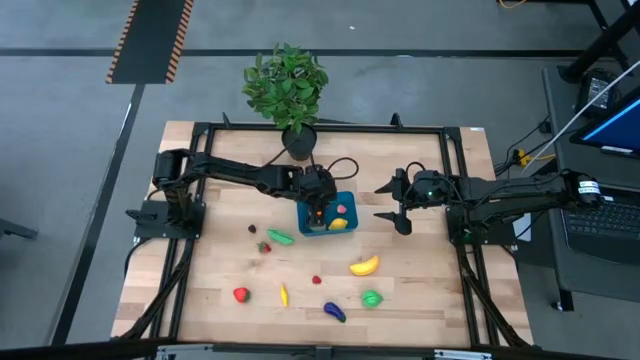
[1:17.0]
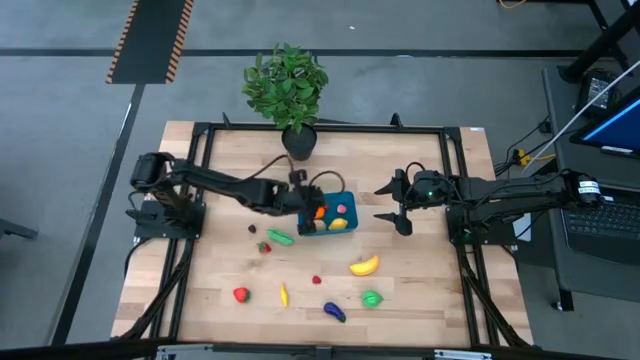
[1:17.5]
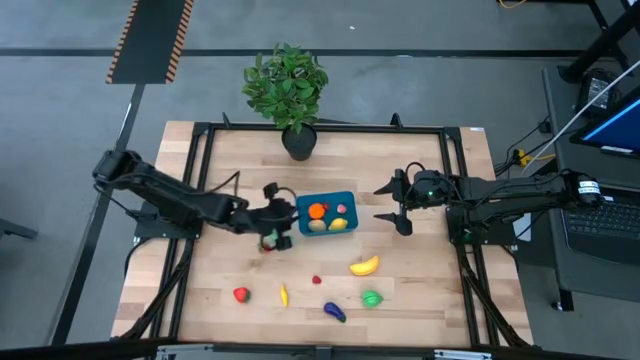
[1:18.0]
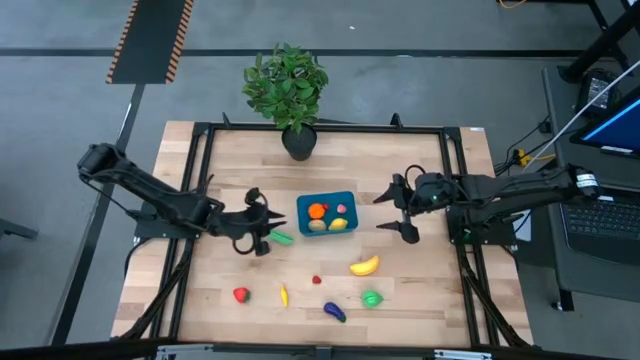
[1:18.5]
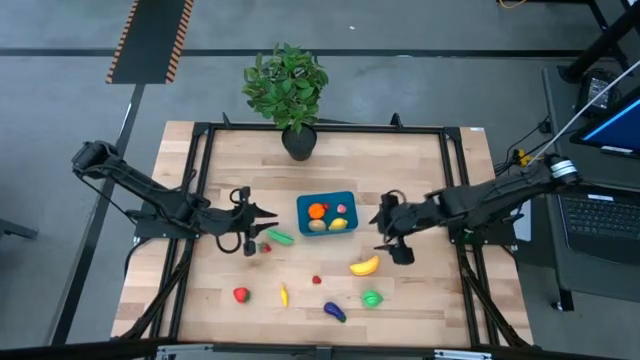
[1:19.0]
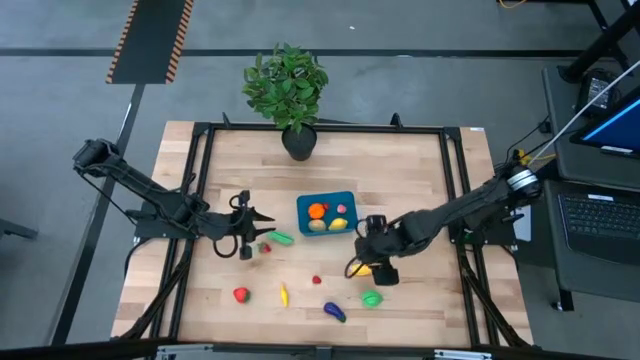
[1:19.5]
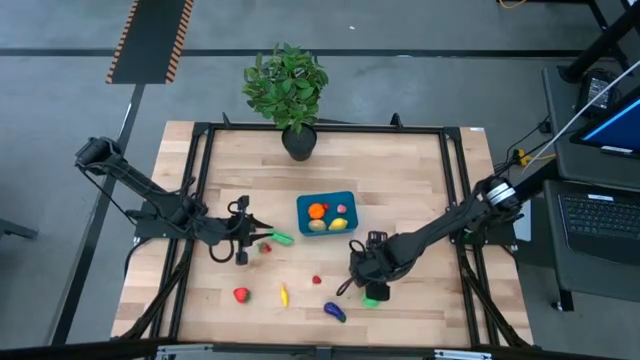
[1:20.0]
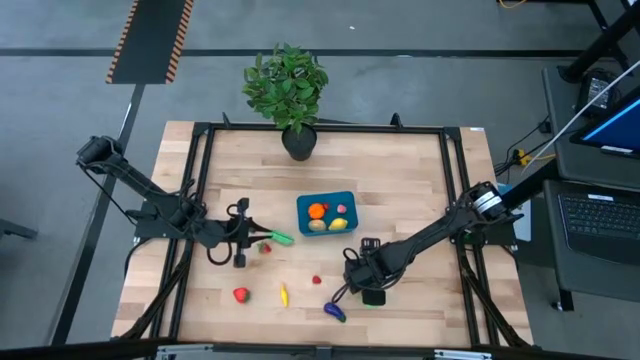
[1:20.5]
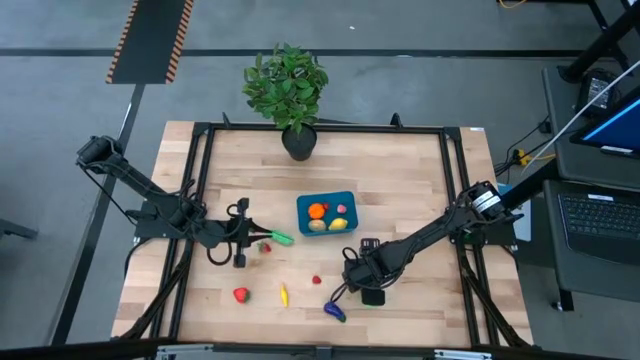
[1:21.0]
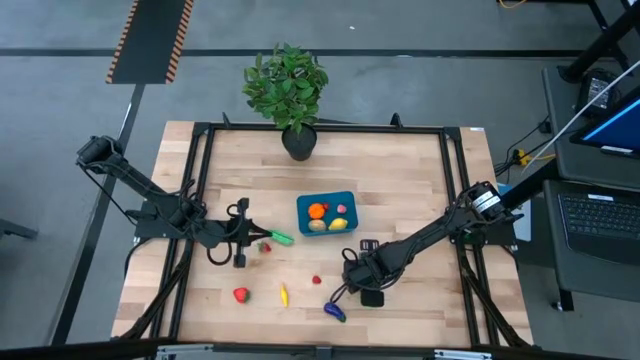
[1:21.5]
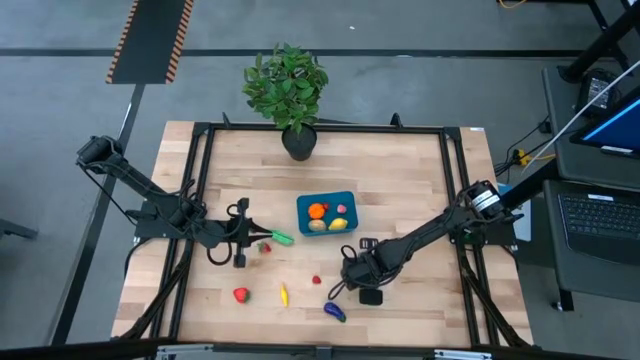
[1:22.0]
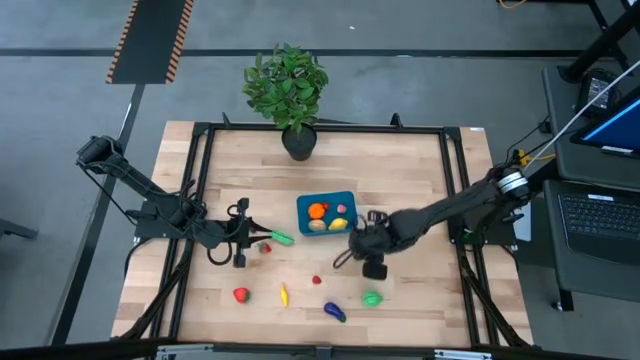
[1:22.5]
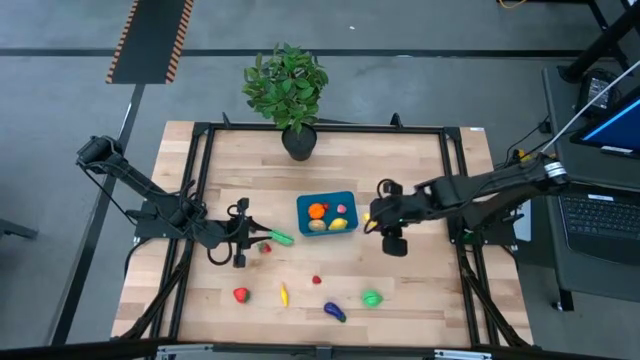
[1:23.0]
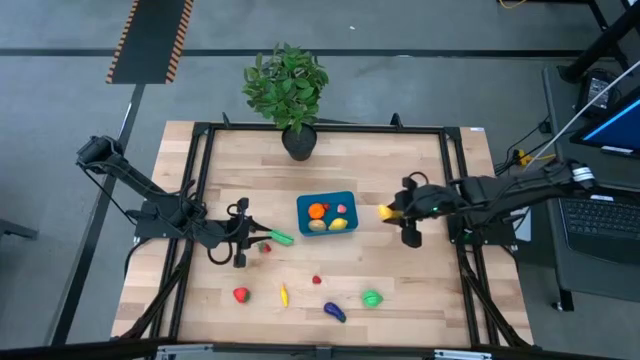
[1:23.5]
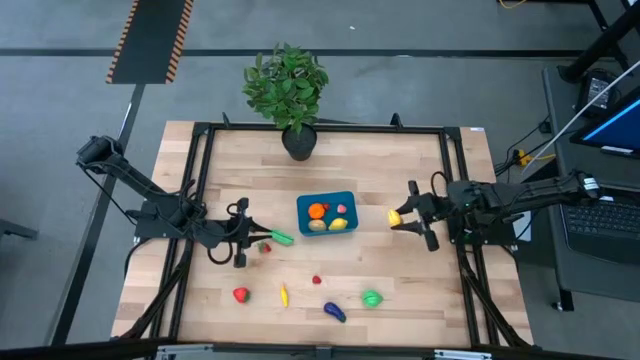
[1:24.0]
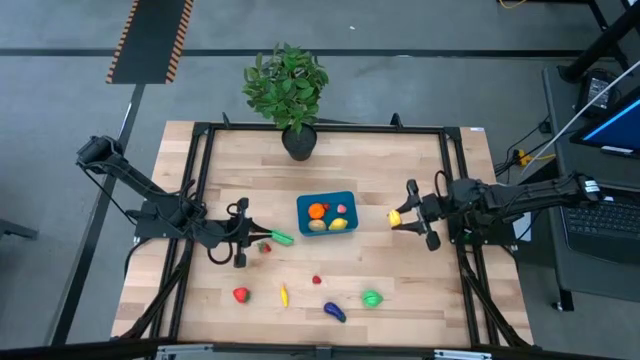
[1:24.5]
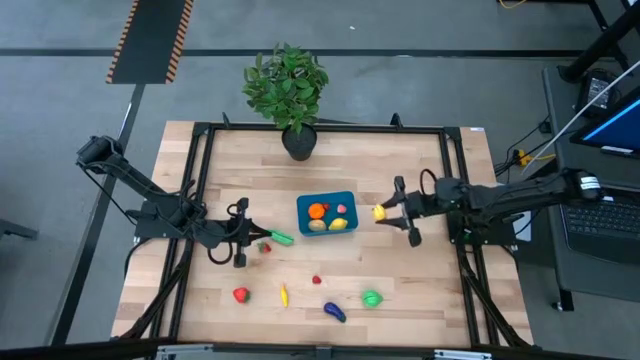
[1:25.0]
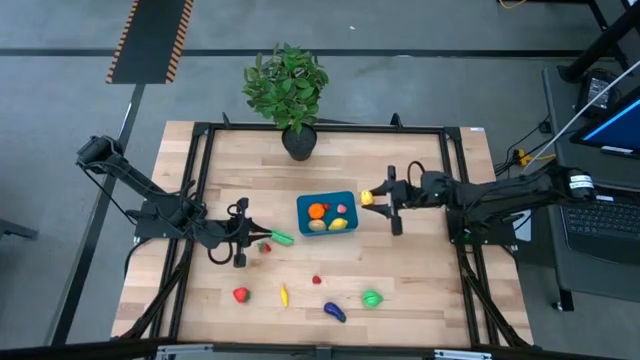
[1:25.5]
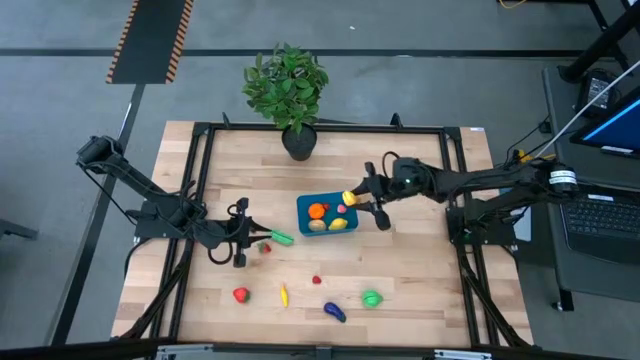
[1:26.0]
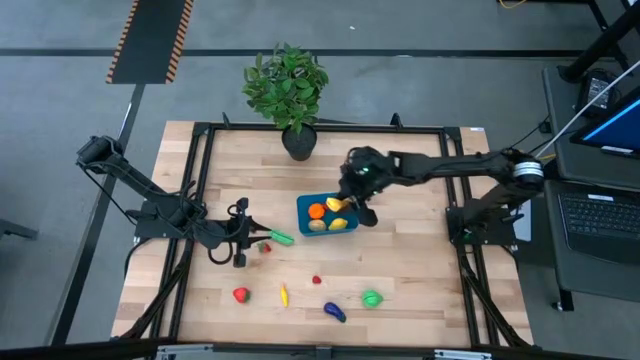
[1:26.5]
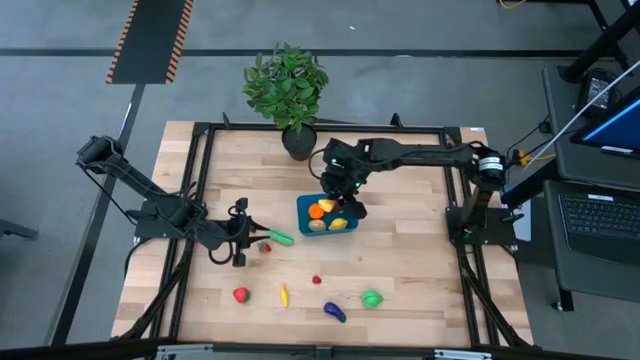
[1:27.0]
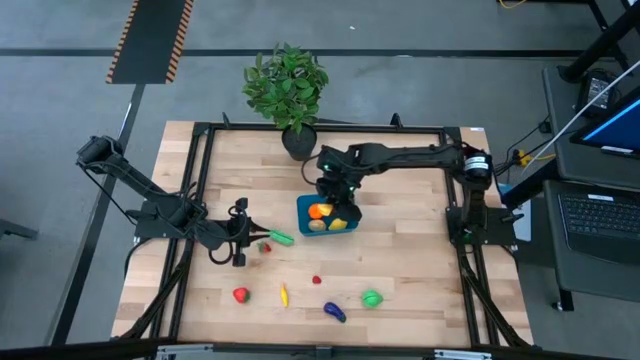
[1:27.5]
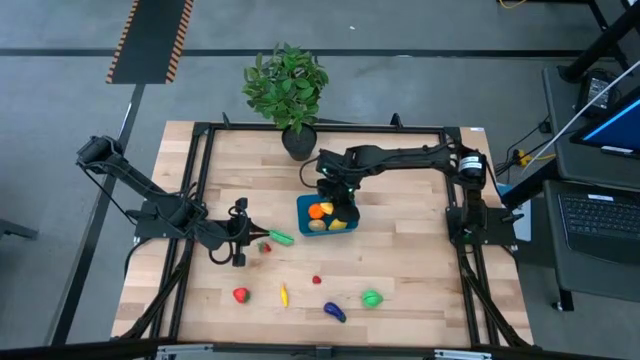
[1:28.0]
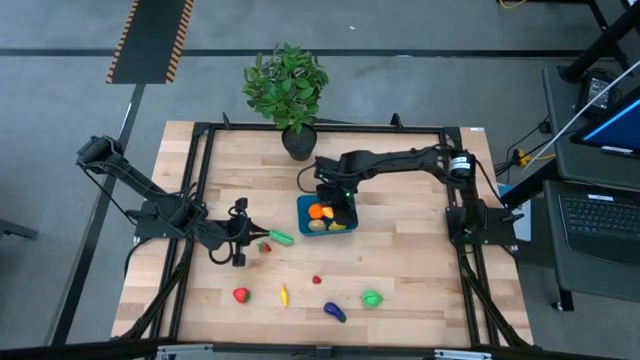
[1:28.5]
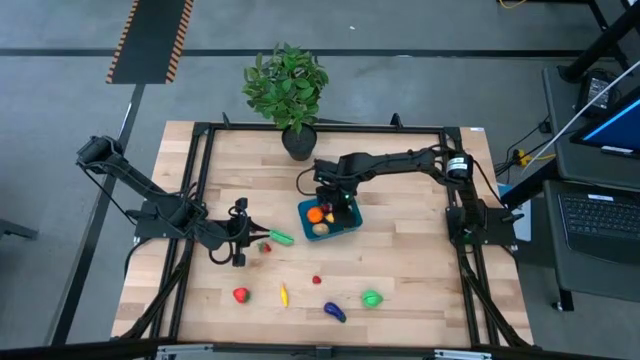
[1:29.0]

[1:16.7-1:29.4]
Task: Pick and placing Produce into tupperware
Put the yellow banana into the blue bin

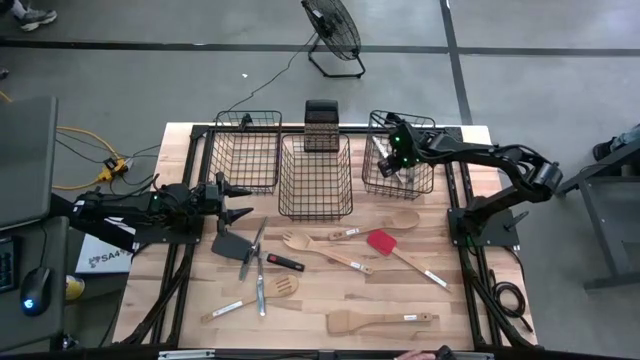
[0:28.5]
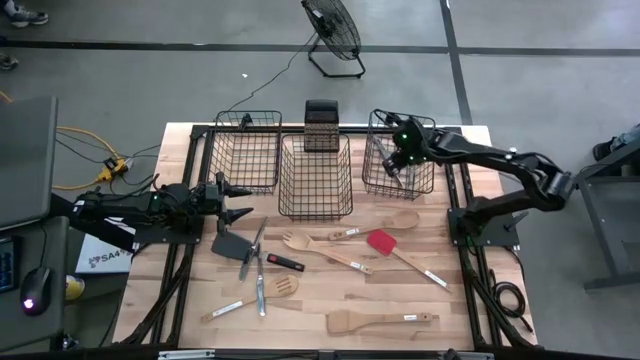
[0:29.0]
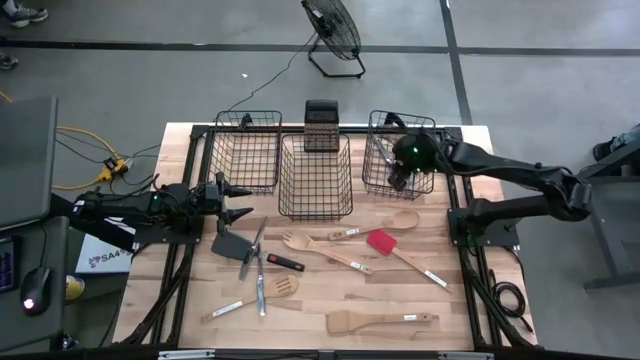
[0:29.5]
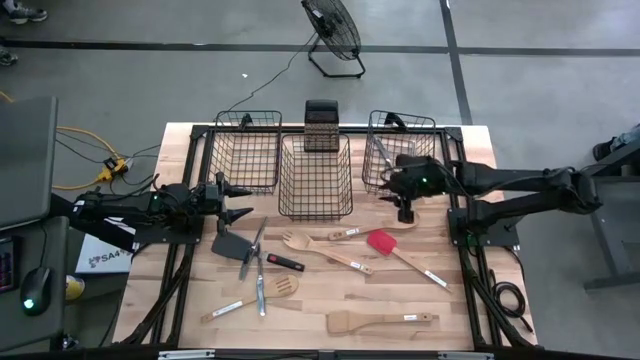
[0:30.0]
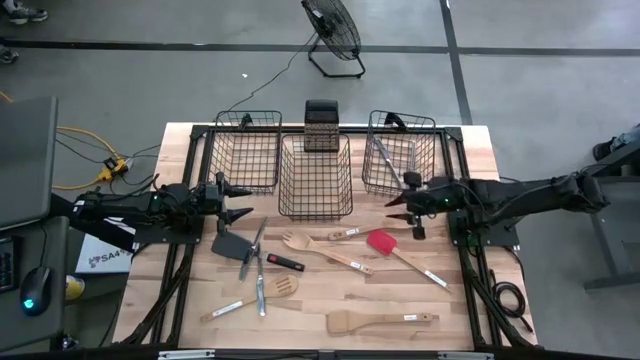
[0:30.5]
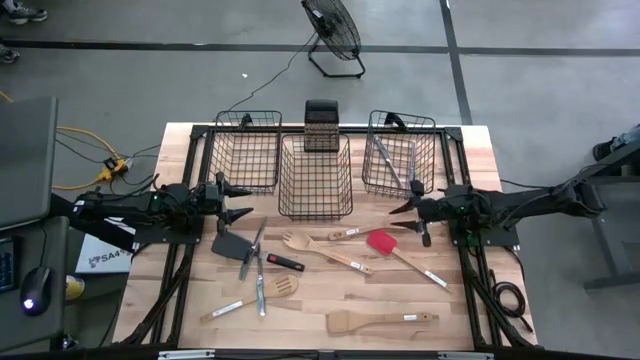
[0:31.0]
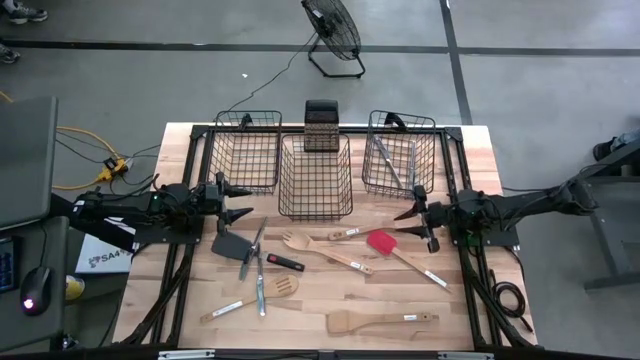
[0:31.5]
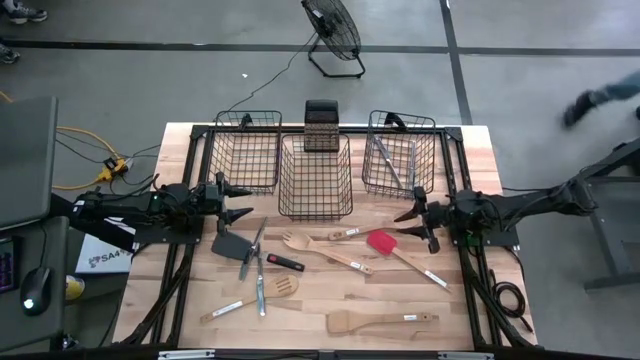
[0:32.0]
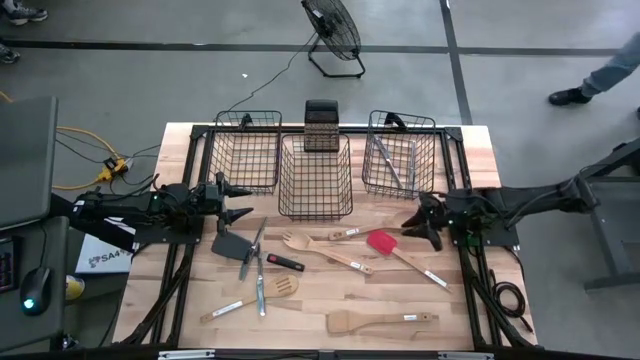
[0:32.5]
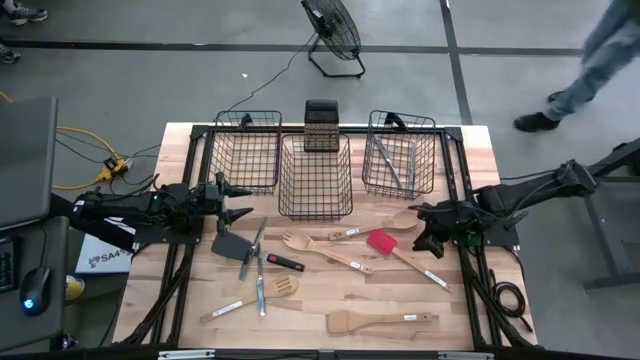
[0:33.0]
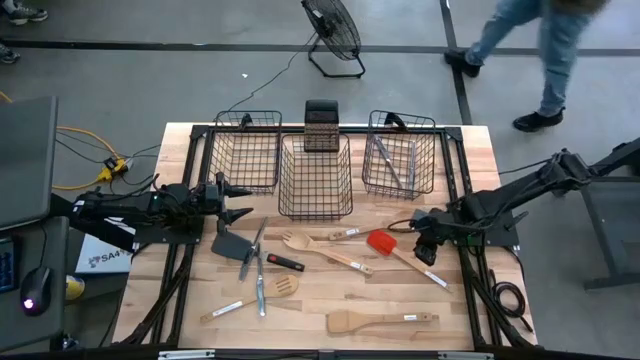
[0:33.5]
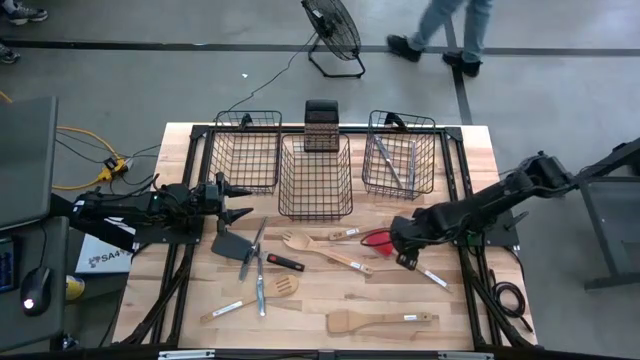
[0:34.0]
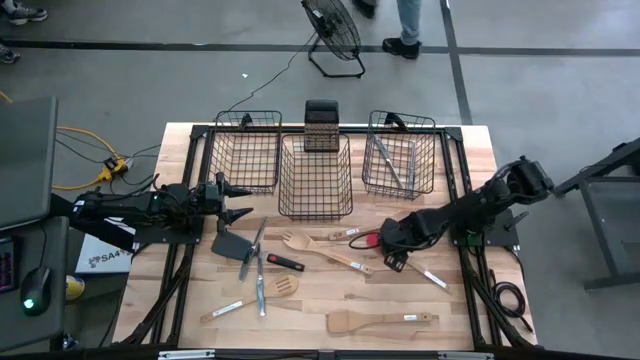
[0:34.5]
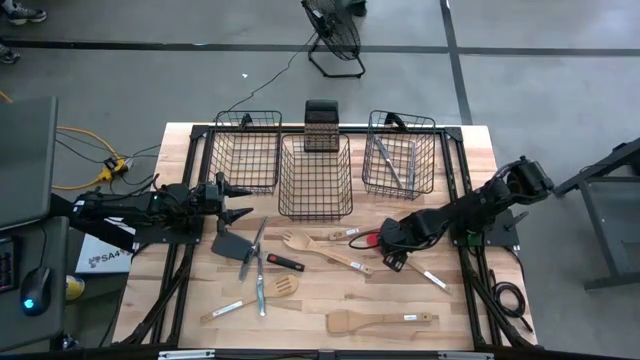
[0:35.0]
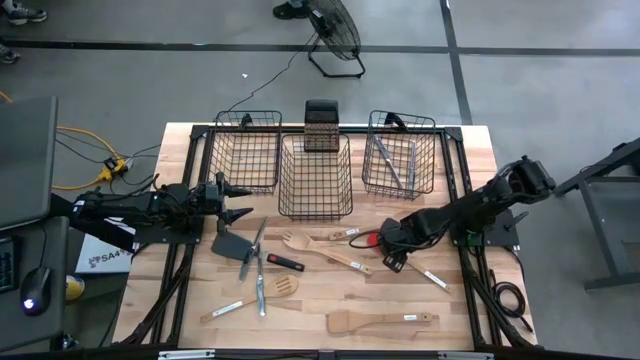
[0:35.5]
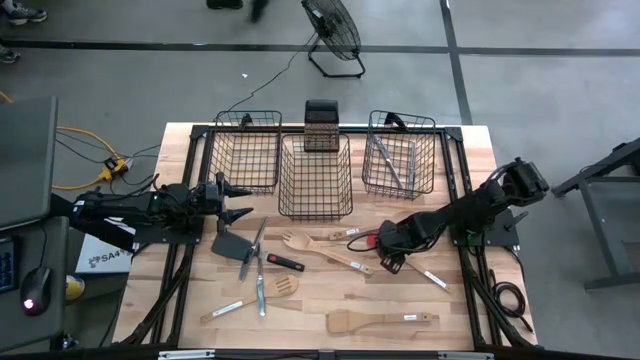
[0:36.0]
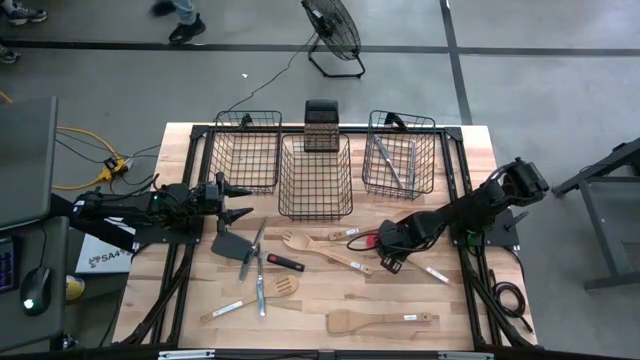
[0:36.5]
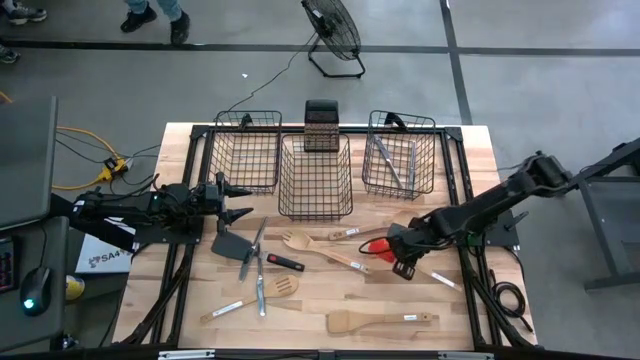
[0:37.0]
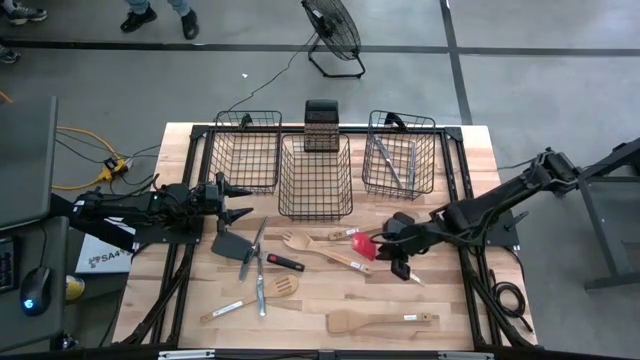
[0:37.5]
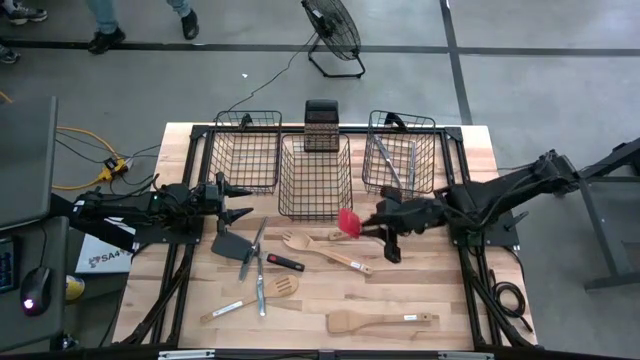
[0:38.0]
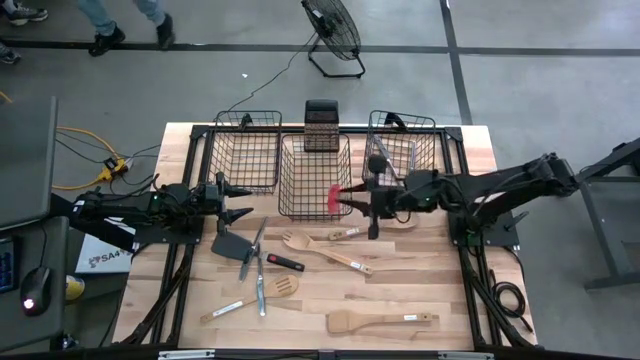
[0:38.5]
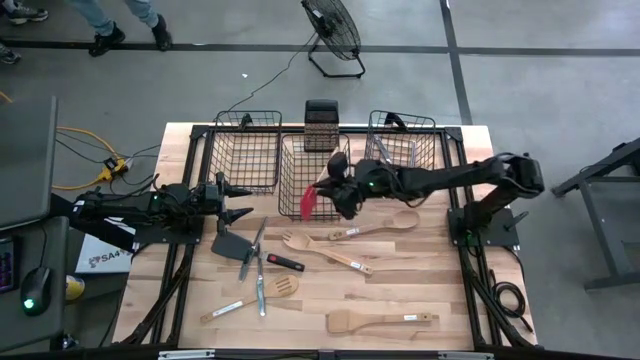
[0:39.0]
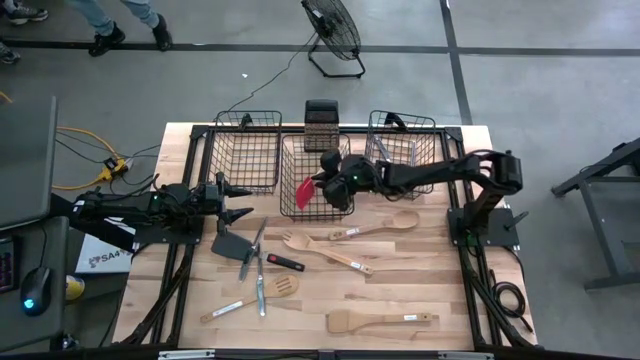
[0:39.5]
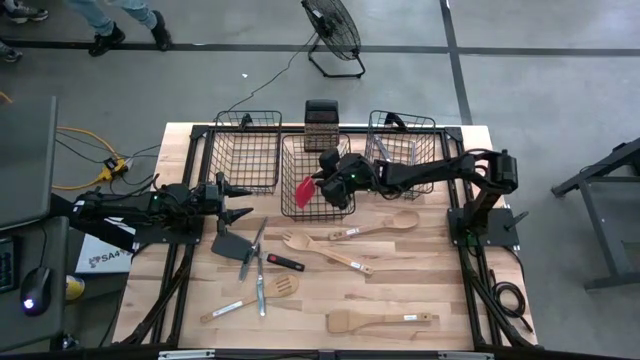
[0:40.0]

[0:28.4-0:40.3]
Task: Pick & Place Kitchen Items
Put the orange silicone spatula into the middle wire basket
